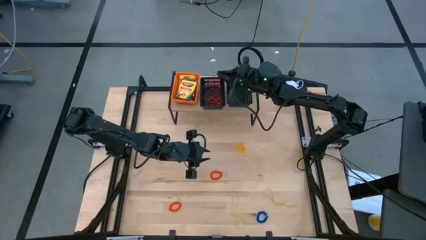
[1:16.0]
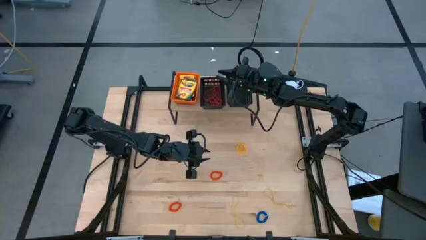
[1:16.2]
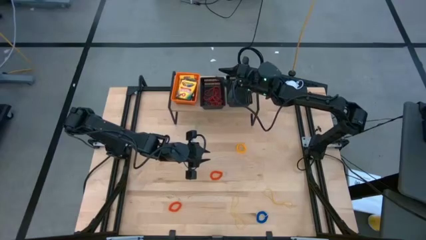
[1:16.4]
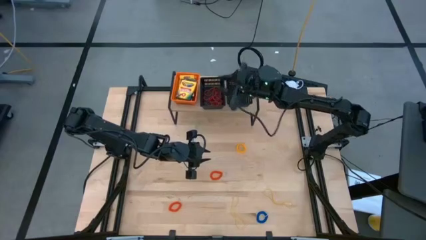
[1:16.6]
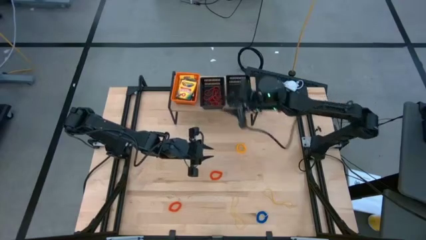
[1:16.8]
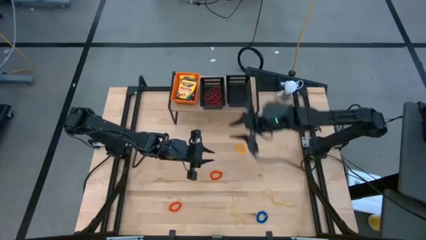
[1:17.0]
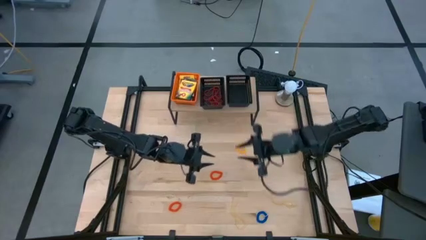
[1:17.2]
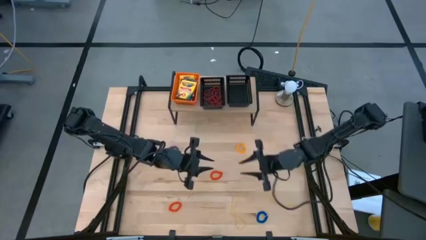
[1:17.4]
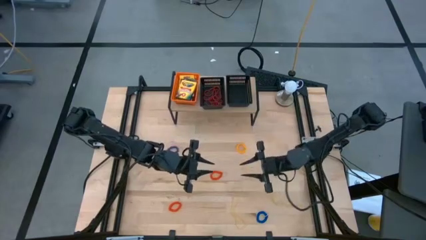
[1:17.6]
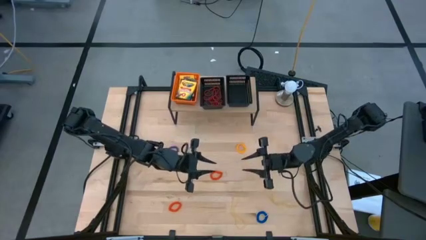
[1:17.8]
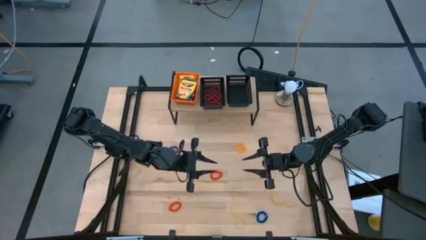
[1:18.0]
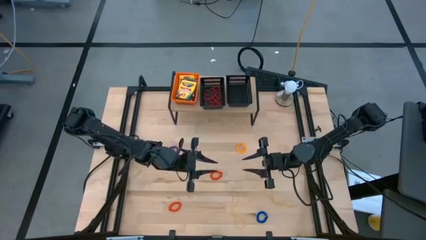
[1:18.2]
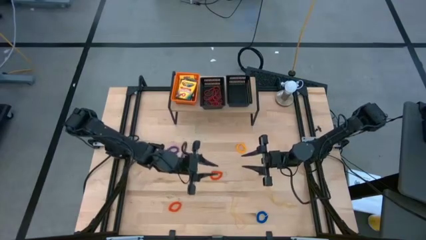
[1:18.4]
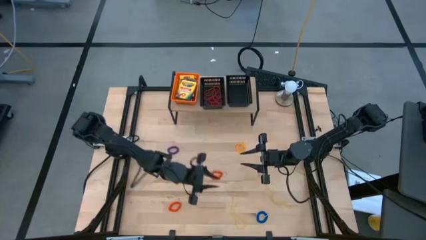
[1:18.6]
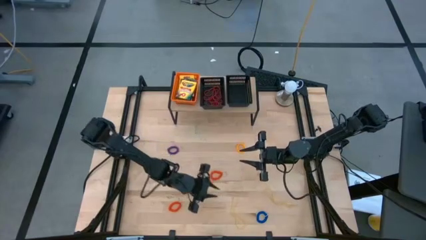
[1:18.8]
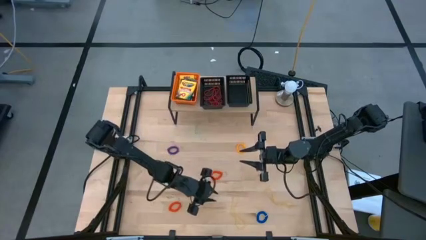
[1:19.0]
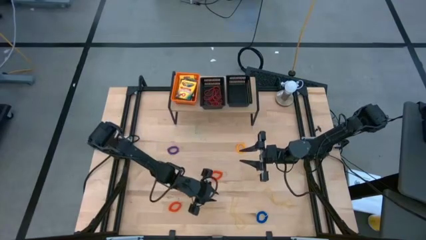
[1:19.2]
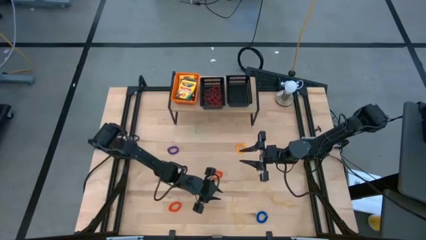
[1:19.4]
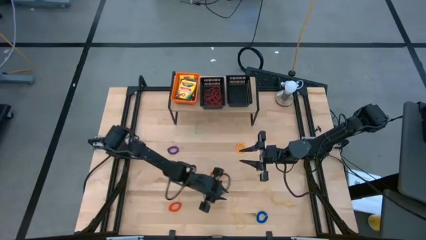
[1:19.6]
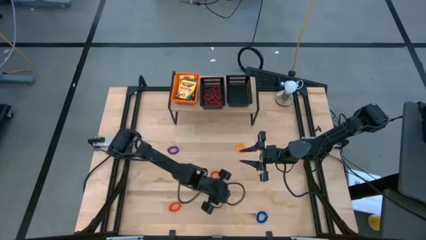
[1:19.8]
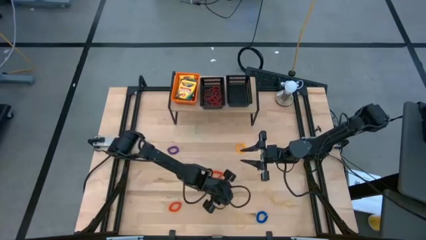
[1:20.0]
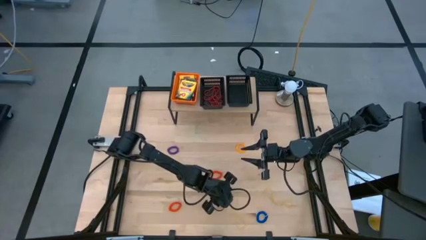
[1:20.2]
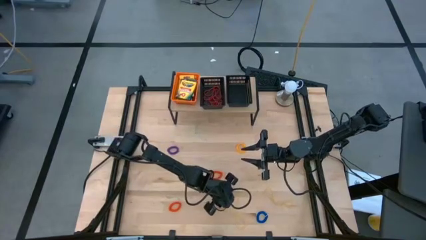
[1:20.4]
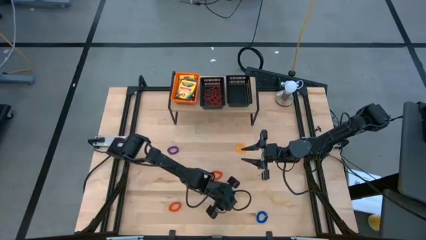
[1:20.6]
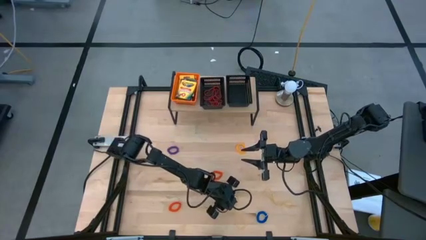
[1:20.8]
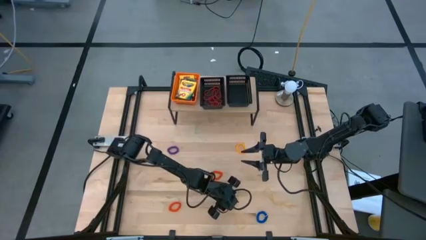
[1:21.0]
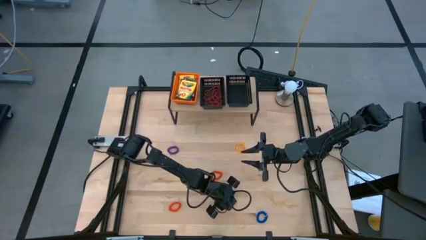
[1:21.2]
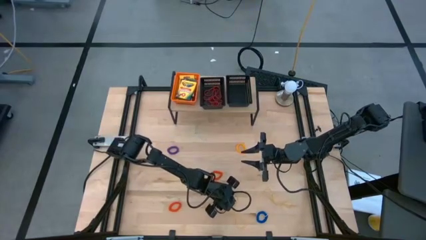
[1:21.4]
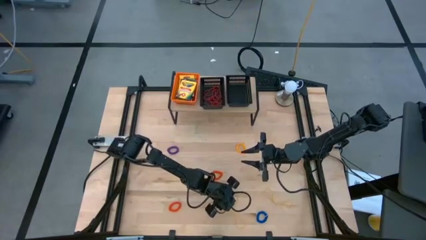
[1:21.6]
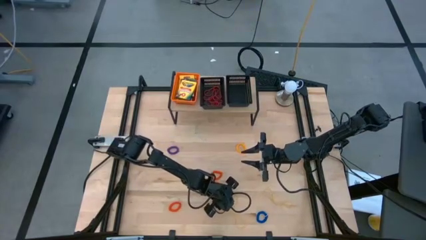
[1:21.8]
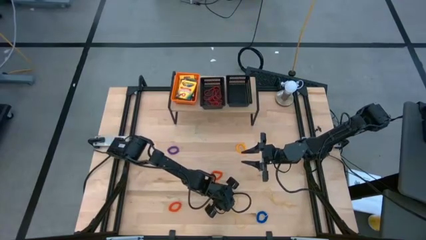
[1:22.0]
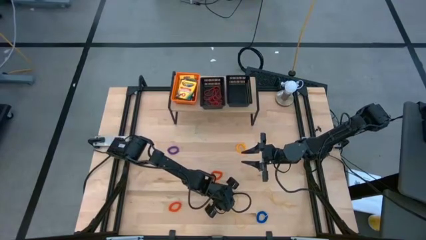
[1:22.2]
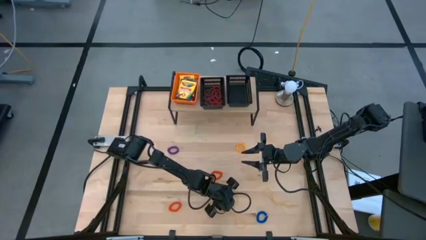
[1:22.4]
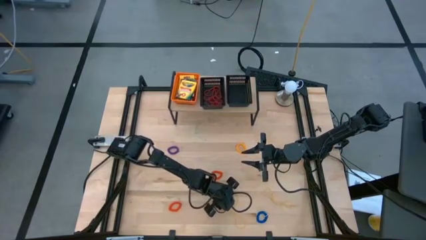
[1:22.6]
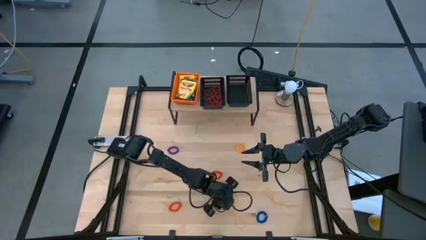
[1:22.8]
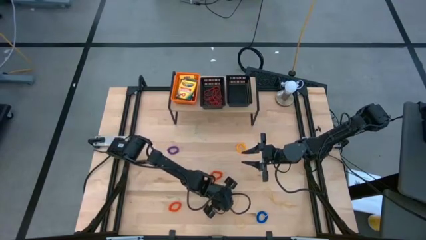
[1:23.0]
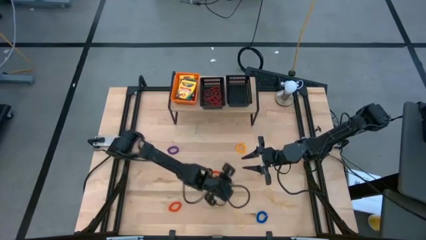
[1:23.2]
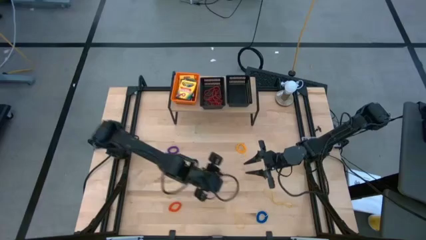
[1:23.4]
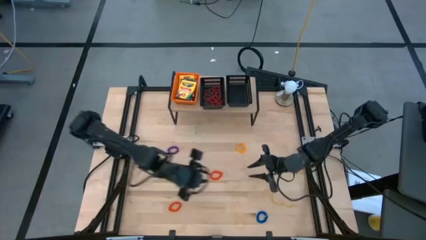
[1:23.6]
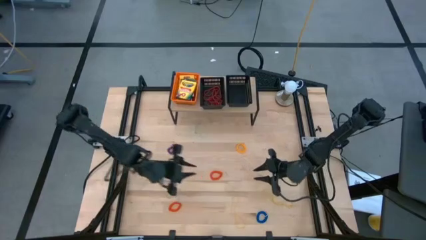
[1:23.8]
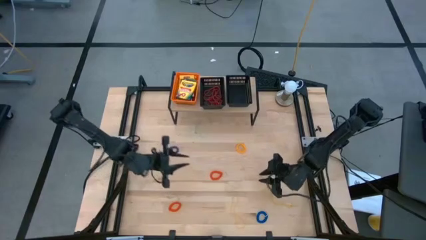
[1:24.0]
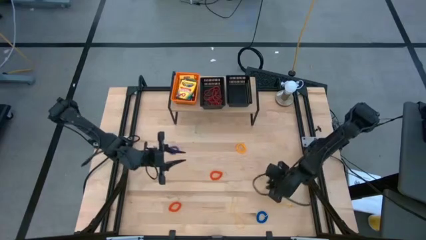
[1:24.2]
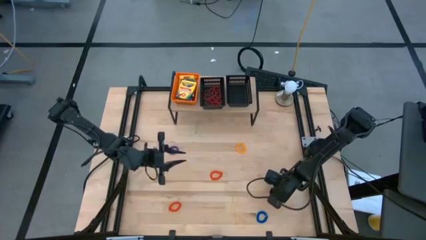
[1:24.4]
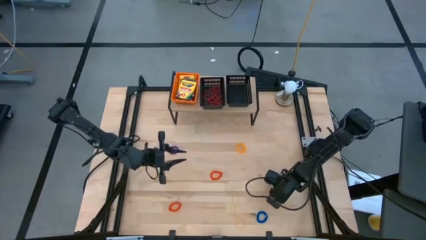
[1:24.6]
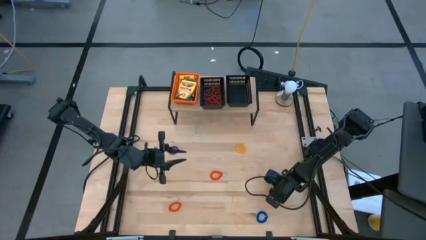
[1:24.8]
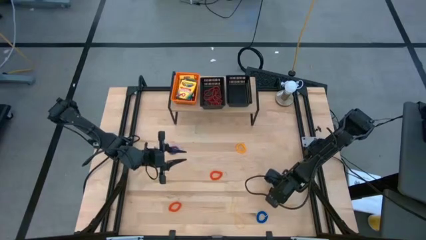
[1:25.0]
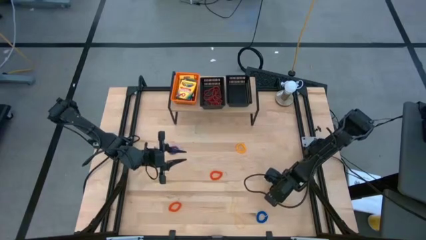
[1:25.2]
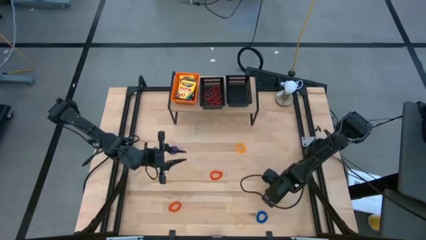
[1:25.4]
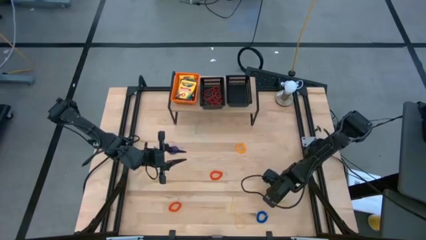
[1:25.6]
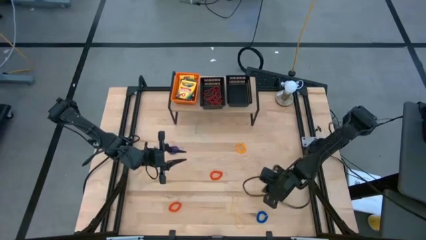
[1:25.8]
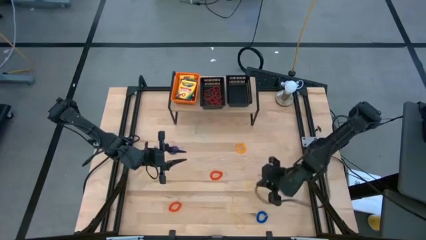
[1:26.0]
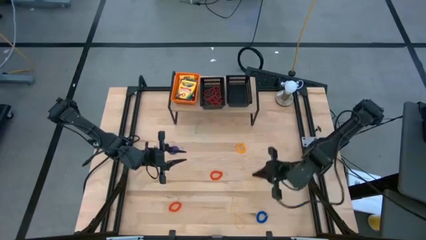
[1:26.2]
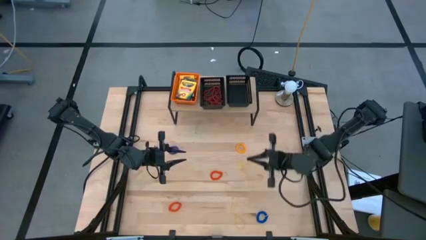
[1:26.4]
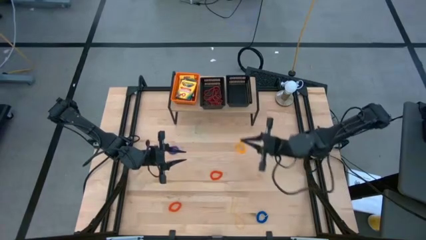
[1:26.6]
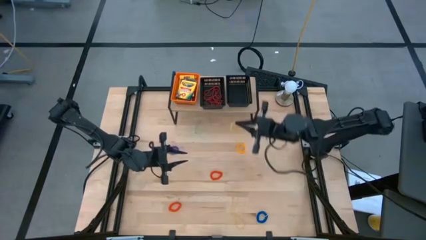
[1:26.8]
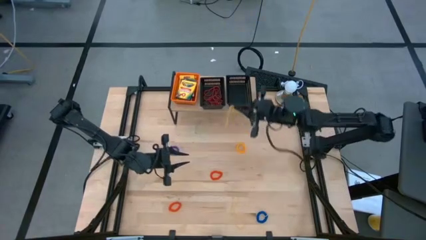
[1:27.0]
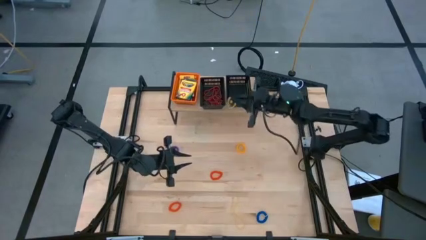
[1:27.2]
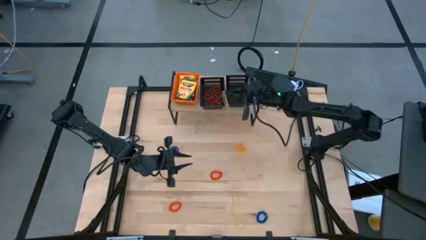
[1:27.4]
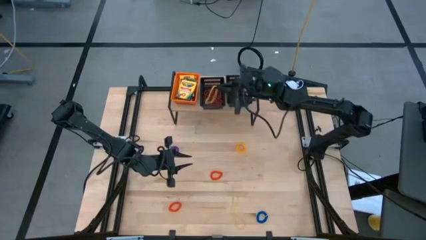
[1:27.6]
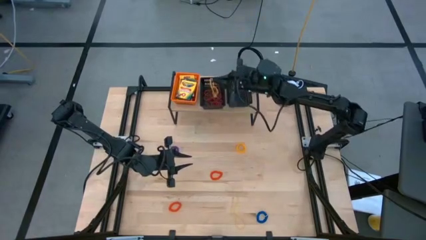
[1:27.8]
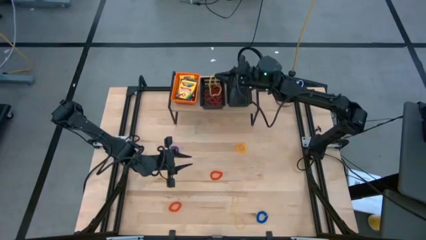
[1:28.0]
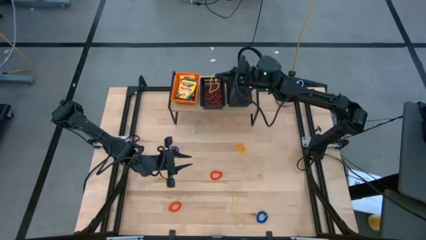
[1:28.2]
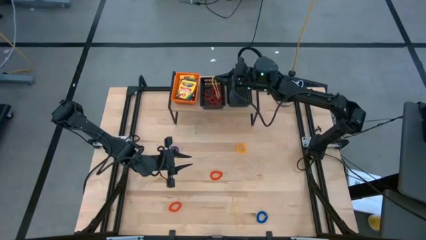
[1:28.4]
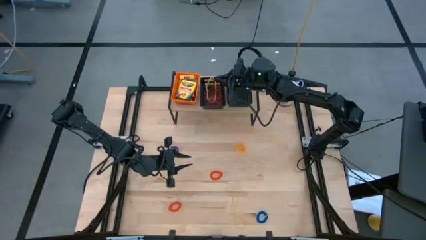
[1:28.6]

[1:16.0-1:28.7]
Task: Pick & Place Office Desk Supplies
Put the yellow rubber band into the left black basket on the shelf

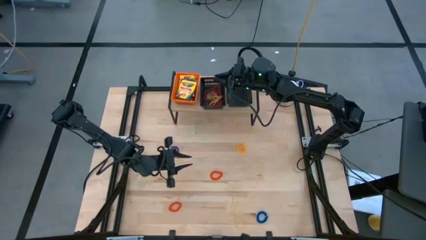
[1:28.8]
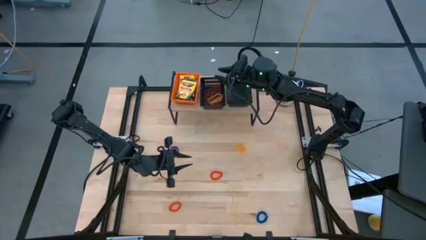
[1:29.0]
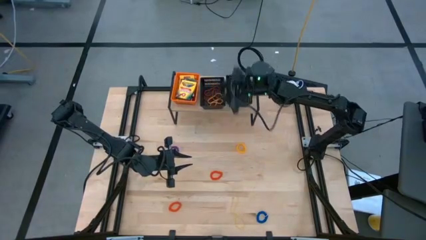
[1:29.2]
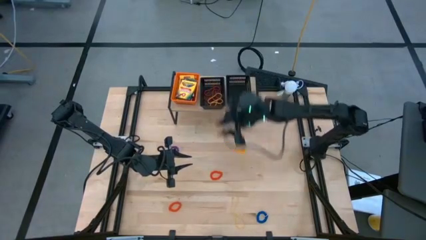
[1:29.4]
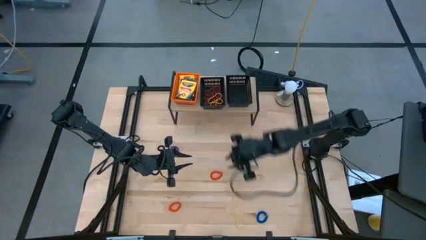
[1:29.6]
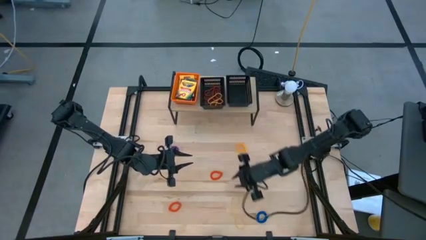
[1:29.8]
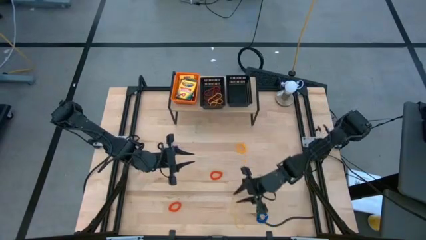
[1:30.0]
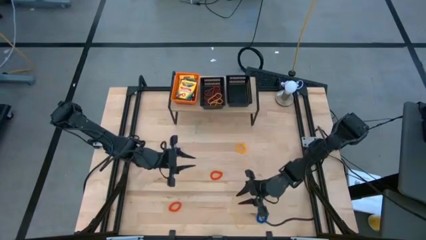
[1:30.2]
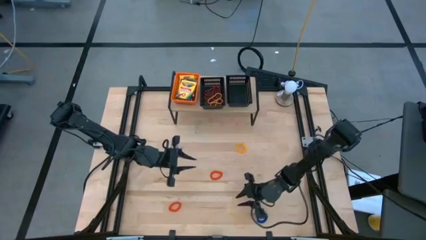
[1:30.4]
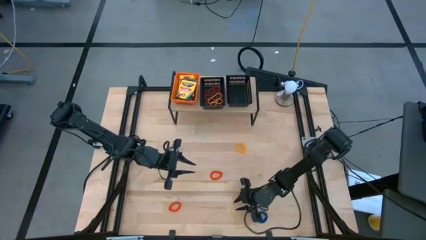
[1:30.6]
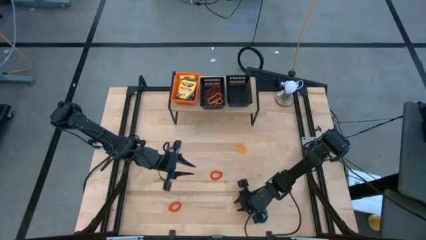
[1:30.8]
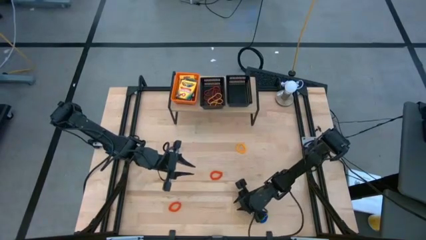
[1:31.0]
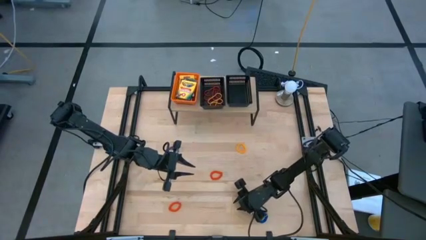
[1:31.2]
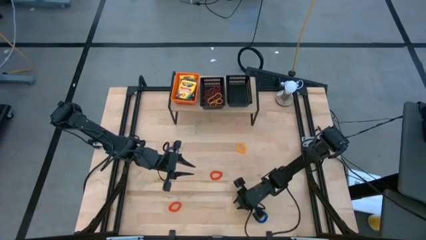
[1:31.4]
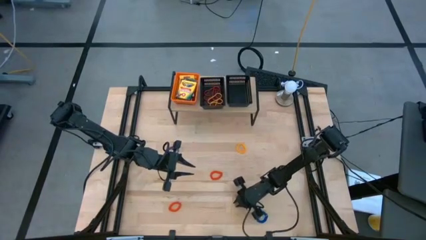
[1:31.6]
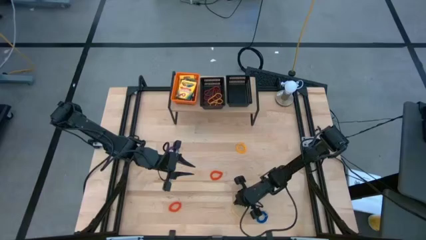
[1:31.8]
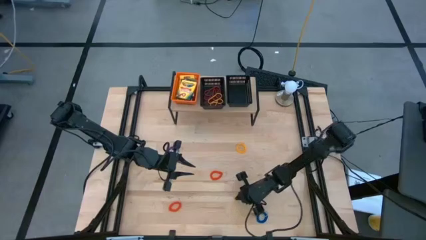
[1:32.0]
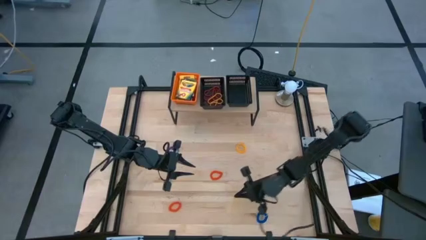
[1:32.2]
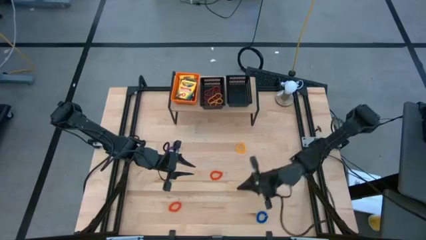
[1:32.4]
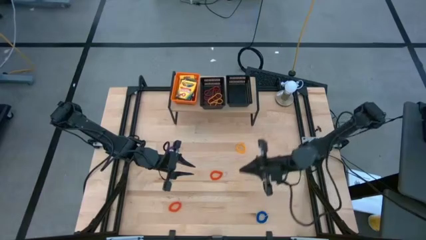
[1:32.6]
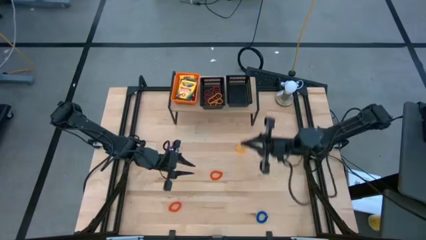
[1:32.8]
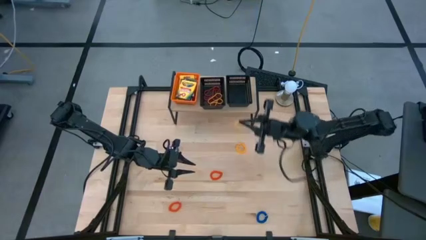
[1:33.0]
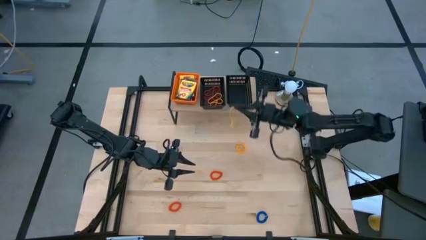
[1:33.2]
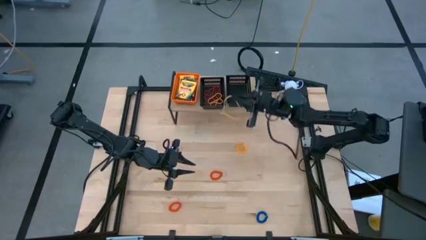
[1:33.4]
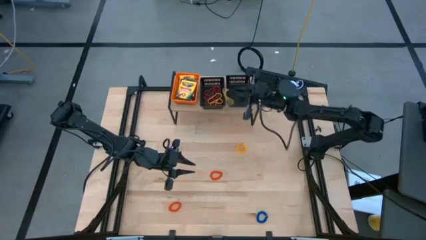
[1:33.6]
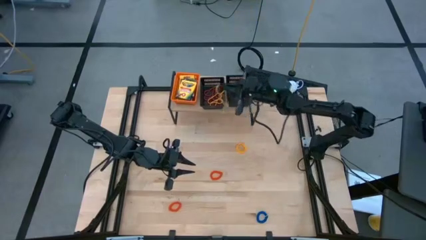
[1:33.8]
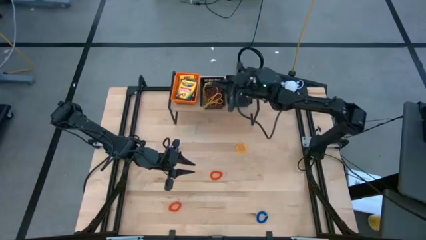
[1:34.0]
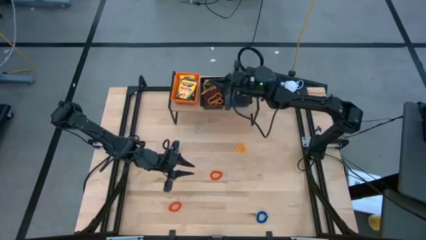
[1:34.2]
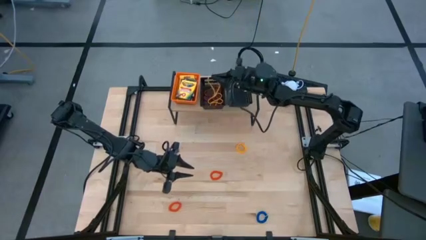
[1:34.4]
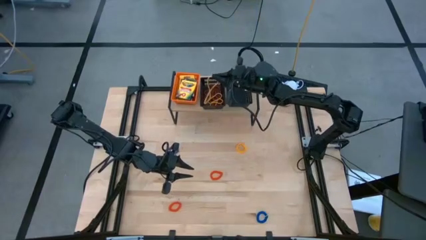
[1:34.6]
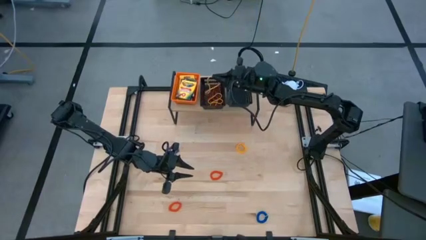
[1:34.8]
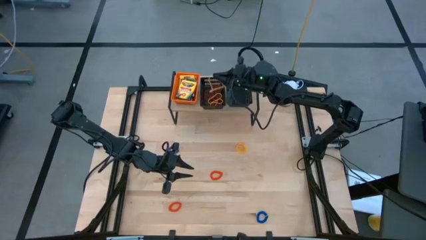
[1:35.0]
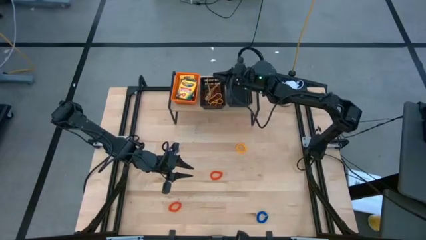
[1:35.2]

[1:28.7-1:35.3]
Put the yellow rubber band into the left black basket on the shelf
